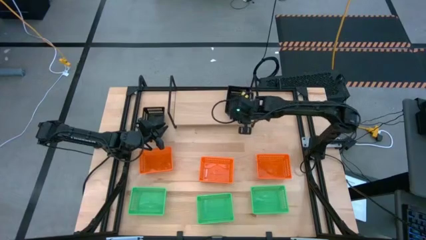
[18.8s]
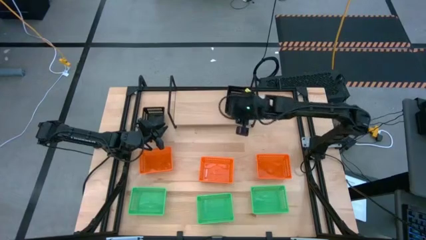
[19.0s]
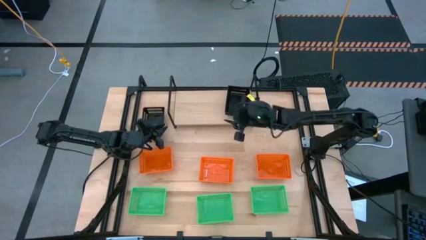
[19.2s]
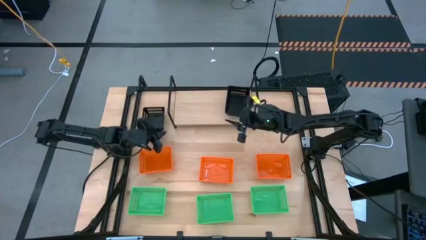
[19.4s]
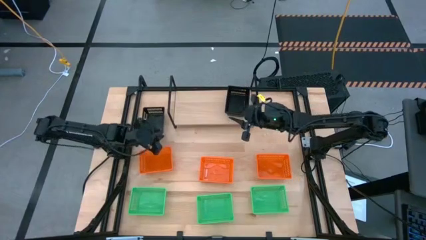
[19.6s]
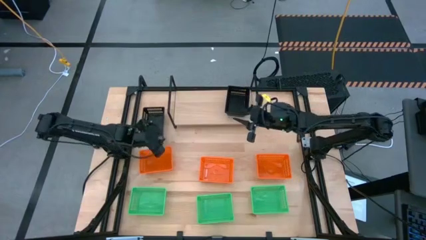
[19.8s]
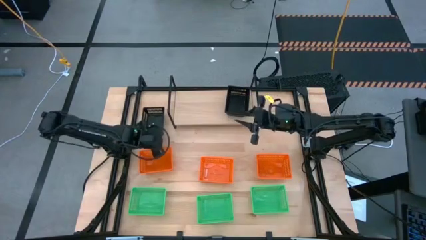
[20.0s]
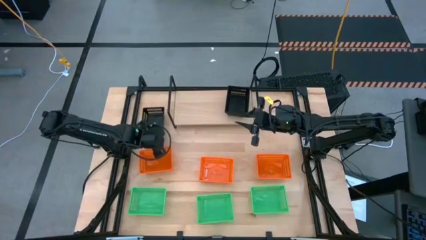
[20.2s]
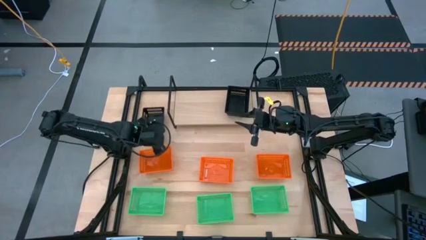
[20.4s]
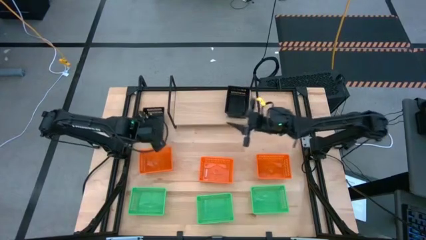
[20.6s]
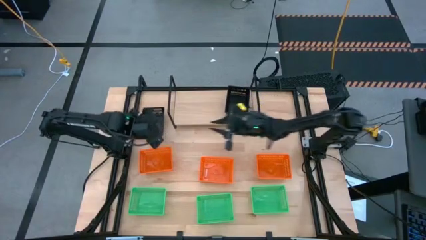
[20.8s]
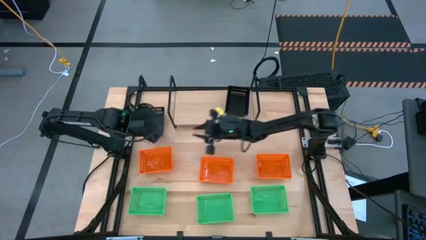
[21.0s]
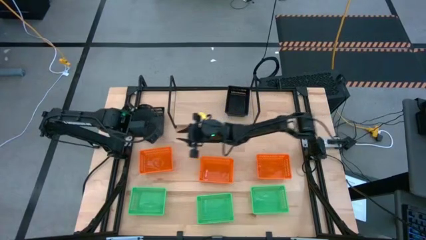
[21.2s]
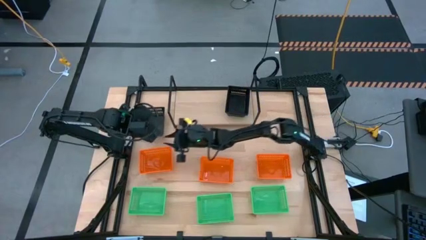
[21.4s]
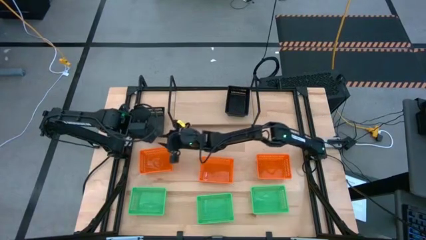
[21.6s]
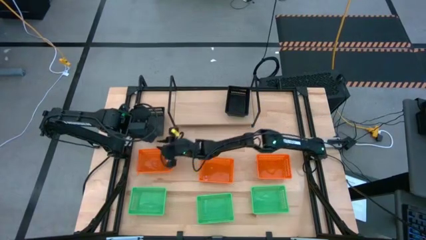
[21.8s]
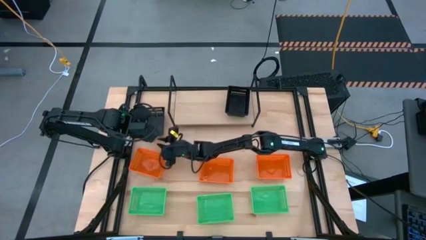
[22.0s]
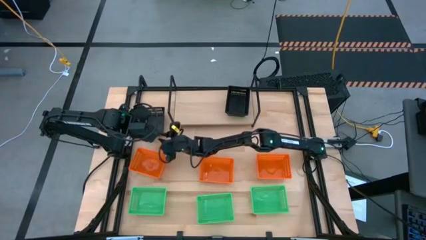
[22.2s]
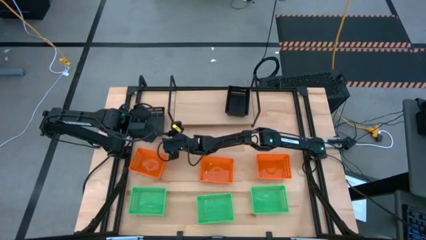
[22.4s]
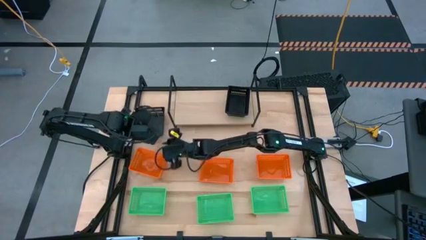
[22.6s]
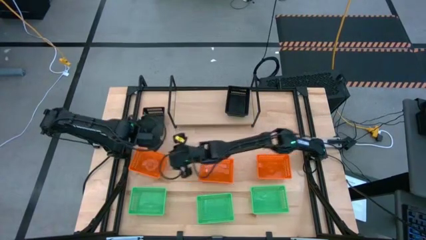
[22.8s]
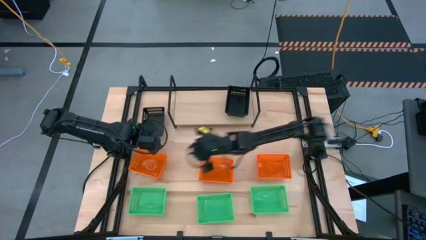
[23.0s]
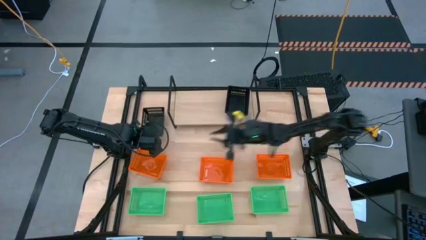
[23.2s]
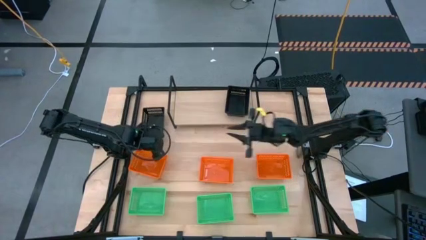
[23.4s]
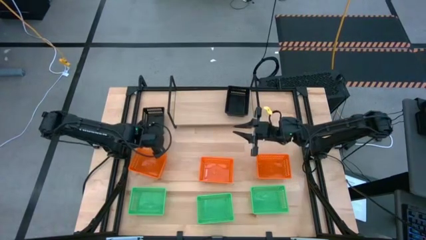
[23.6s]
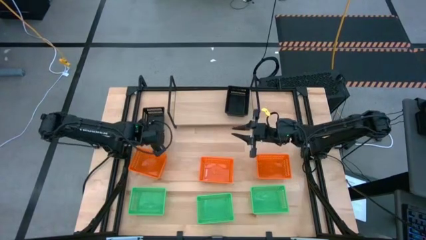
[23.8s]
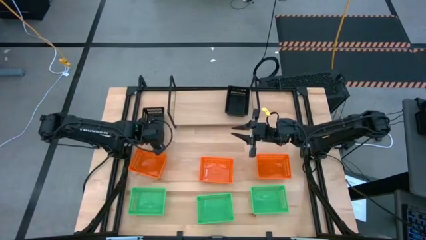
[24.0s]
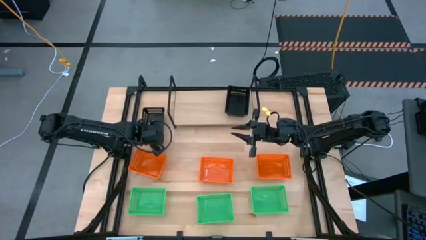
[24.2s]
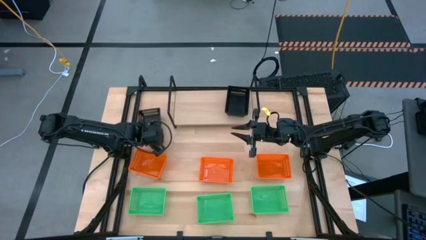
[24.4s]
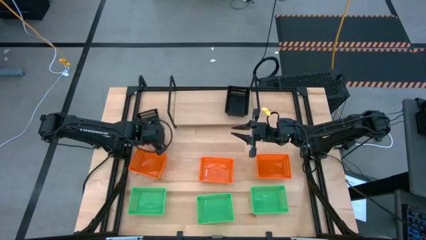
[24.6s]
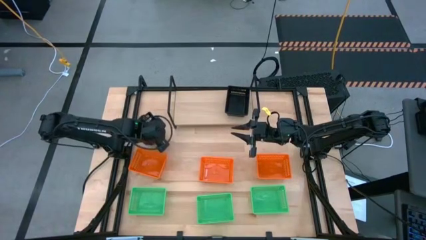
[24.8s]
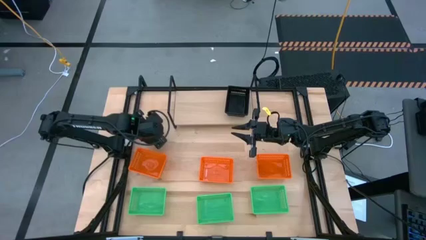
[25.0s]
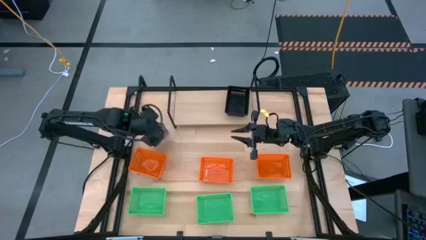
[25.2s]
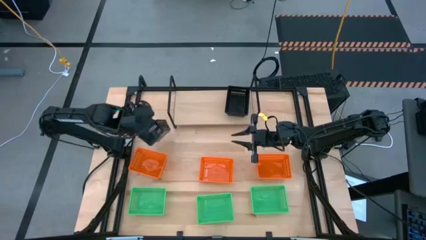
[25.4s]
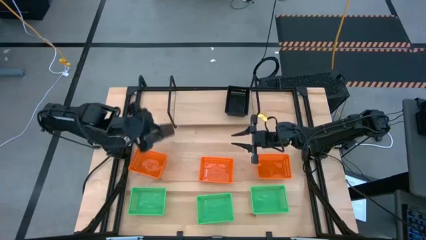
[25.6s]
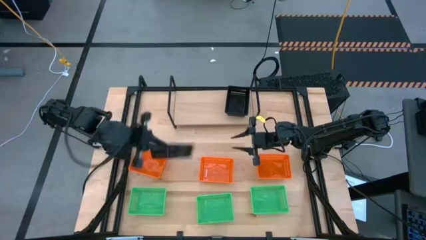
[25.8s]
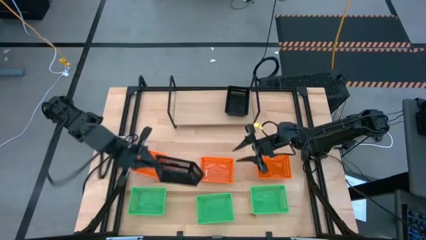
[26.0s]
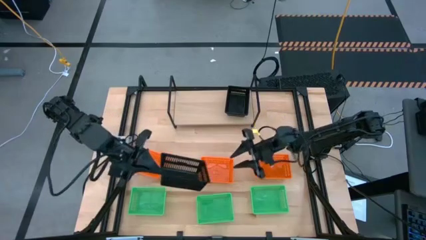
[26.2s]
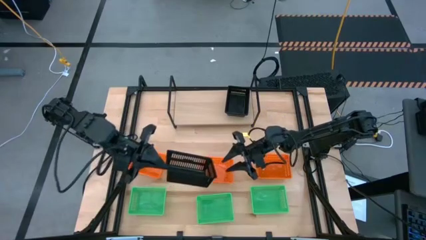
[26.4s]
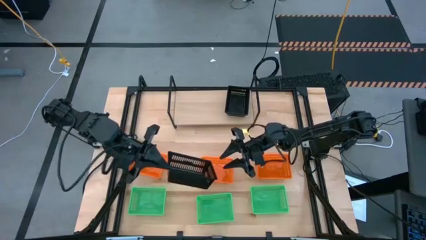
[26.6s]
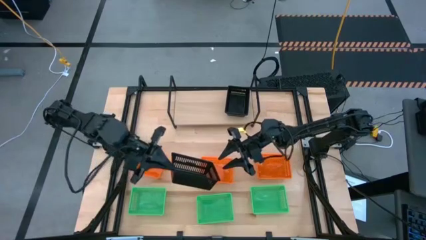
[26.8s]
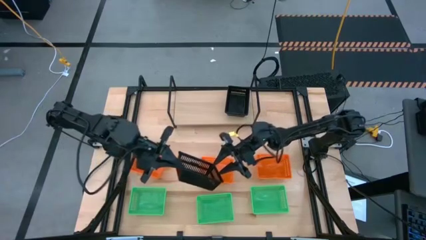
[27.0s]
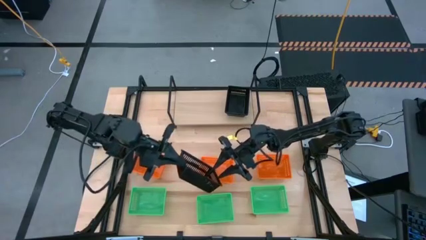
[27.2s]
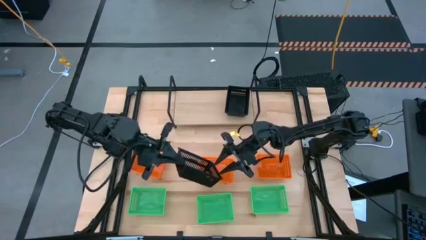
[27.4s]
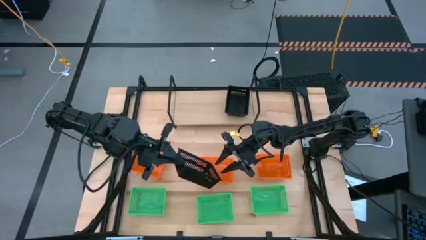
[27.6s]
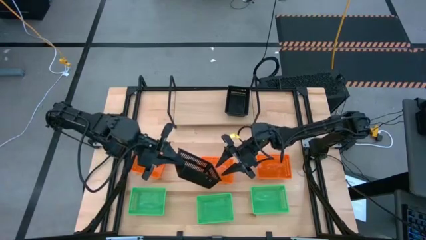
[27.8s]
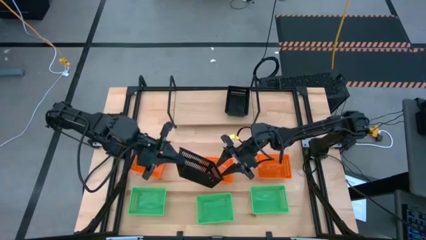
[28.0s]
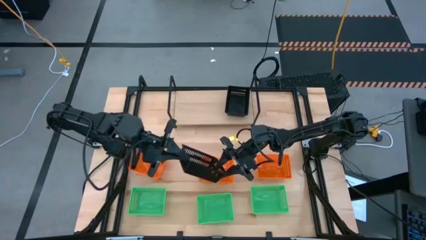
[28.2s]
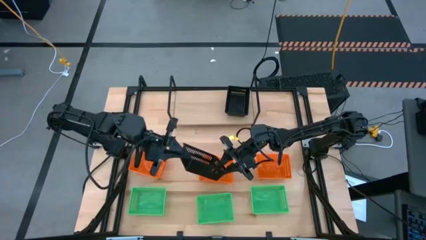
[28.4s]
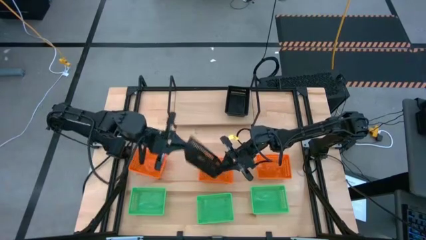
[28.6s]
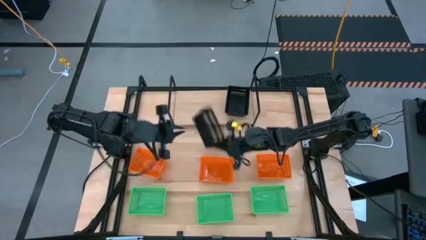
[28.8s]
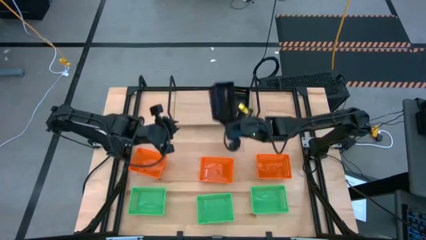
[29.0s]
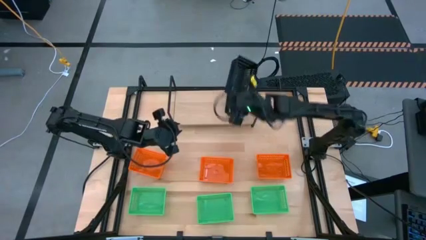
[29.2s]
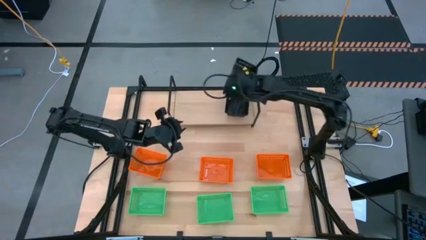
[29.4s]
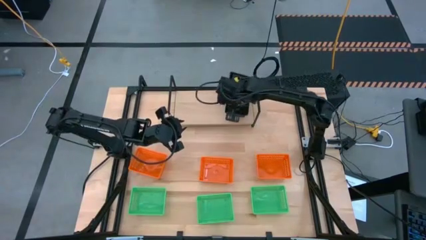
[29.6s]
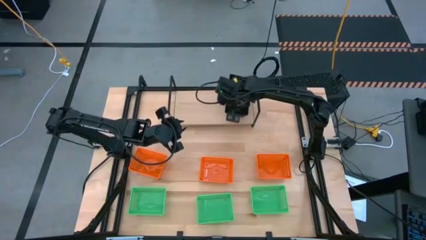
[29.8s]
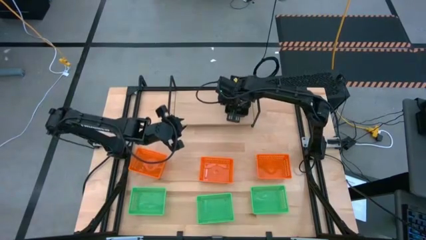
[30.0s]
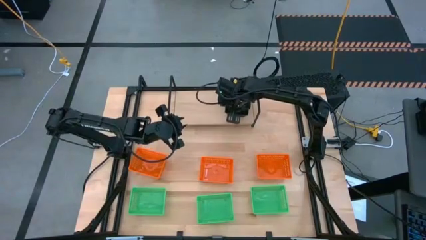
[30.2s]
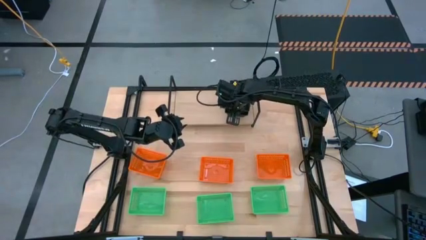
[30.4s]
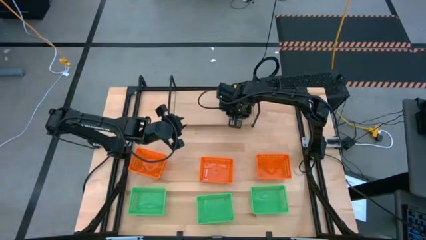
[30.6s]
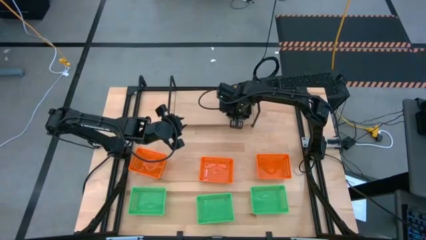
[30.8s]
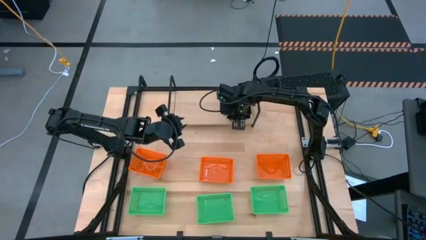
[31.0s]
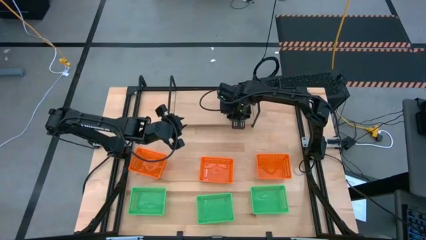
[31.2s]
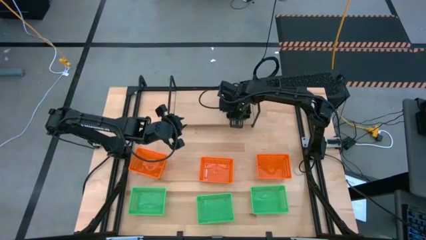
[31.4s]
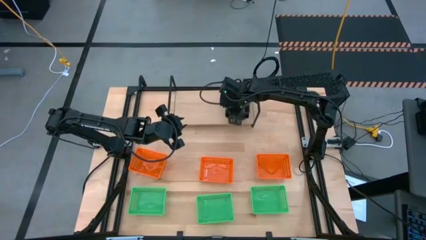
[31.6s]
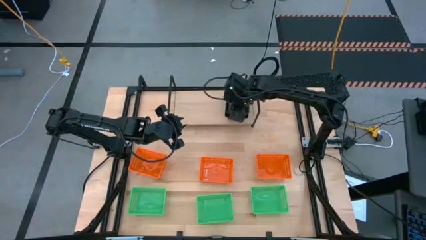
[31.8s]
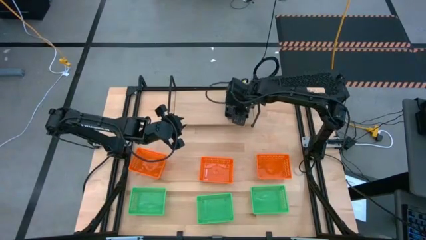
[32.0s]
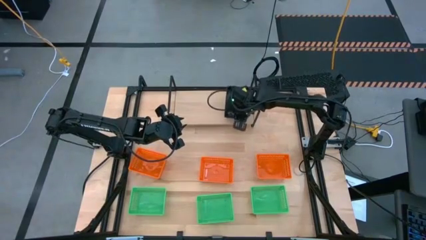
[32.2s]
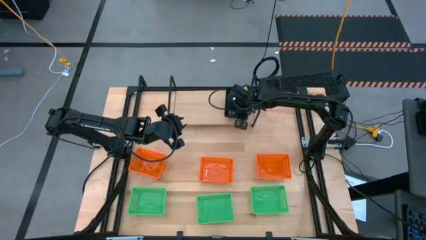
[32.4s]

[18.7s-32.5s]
Task: Stack baskets on shelf by color
Stack the black bin on the black bins on the shelf

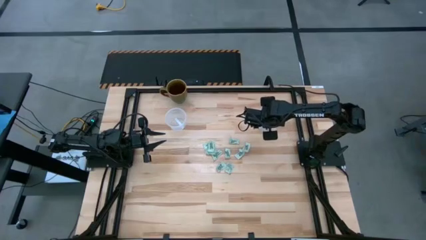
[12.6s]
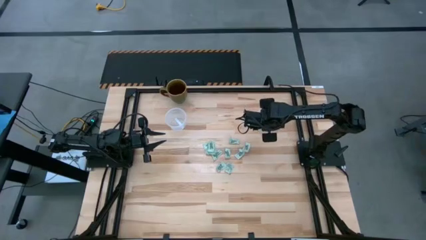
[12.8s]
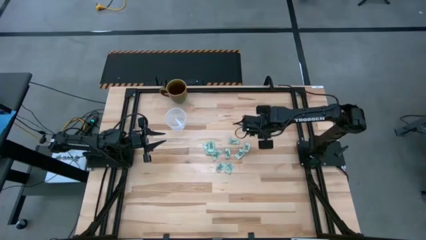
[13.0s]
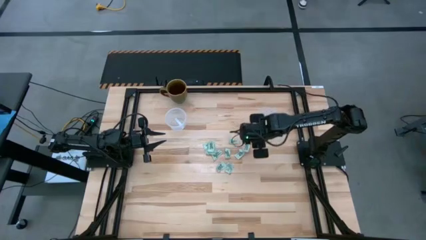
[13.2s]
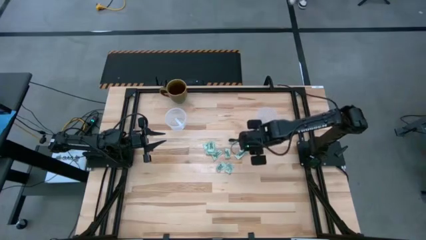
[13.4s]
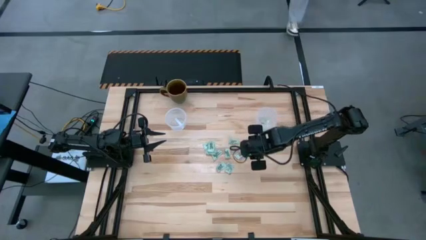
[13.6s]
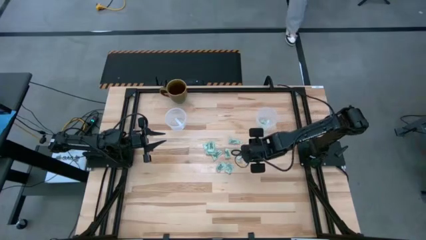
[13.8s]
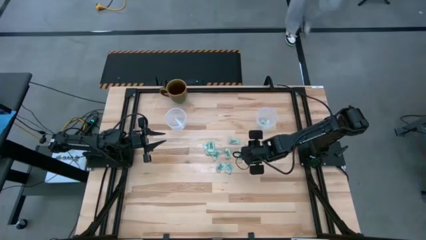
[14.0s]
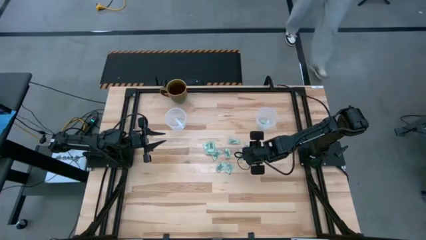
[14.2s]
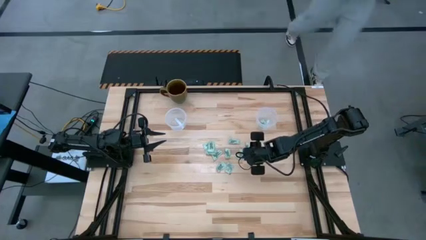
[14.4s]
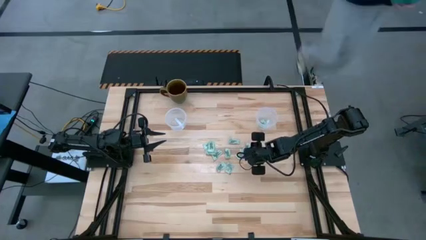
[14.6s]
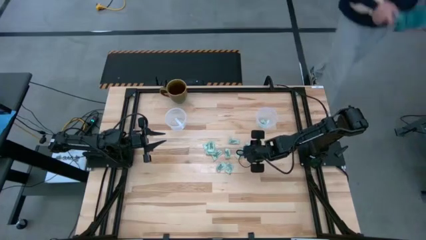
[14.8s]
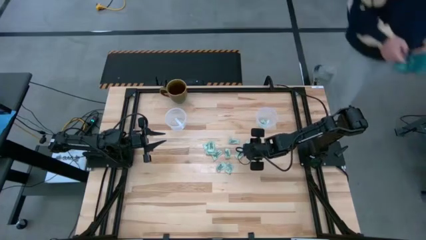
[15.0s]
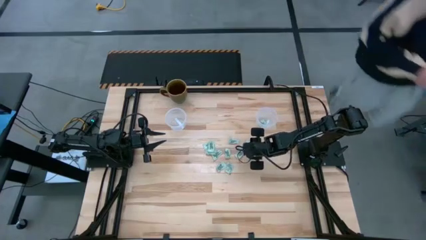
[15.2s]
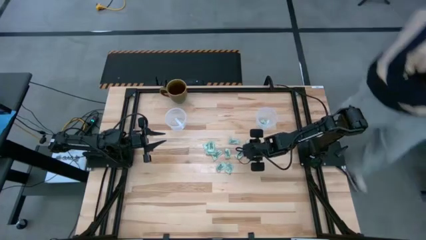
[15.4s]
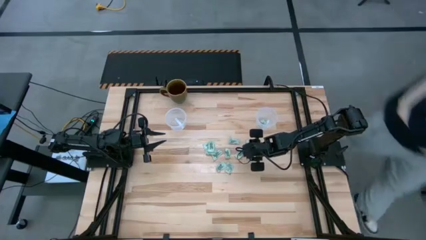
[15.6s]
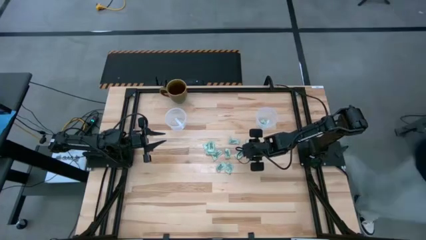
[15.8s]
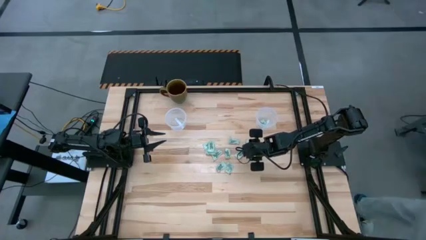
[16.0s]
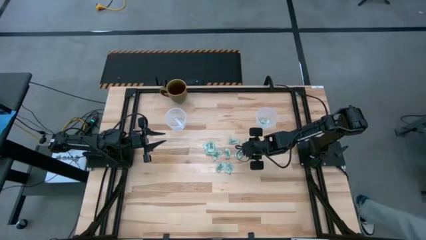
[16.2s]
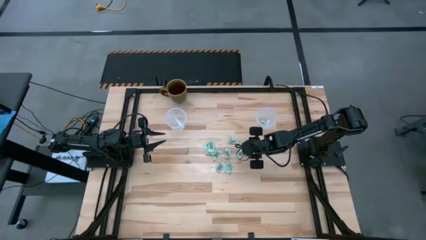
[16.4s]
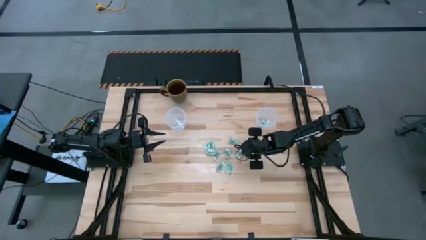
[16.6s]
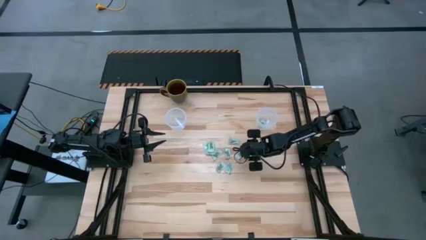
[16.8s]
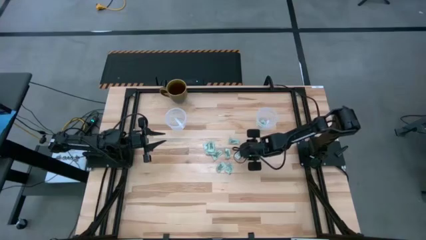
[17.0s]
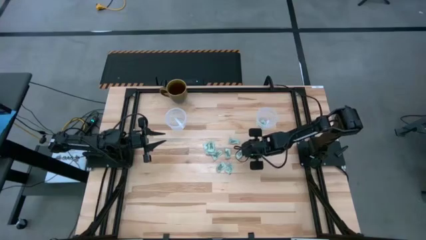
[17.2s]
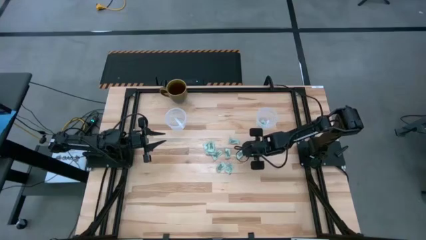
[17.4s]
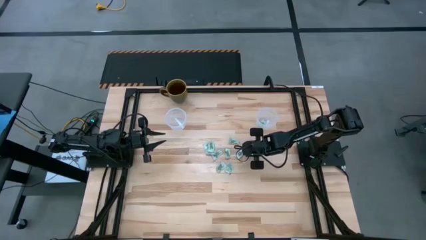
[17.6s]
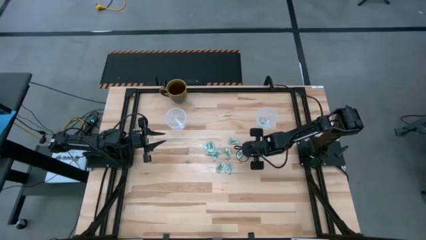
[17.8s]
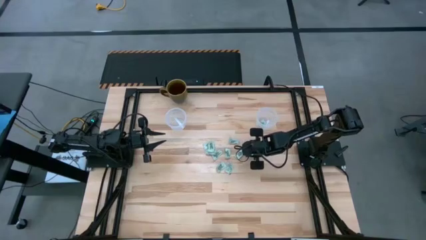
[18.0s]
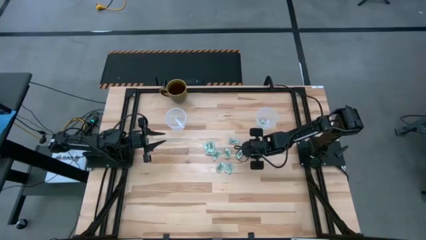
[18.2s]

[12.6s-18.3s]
Task: Pick and place items into bin
Put the stevia packet into the right transparent bin
